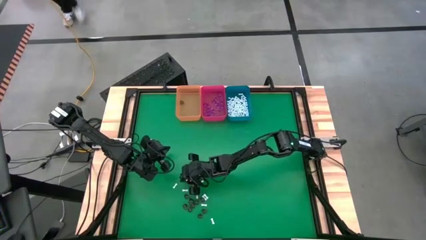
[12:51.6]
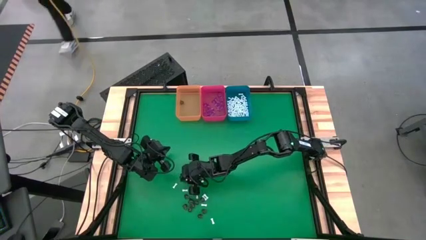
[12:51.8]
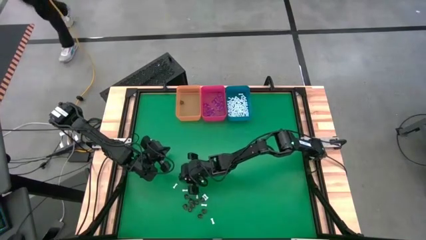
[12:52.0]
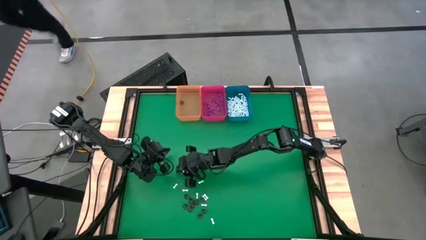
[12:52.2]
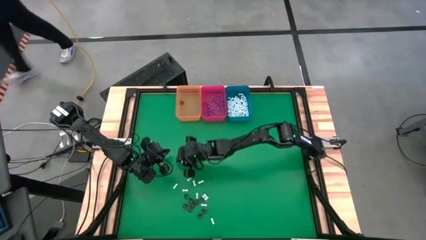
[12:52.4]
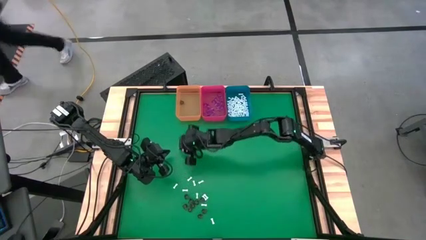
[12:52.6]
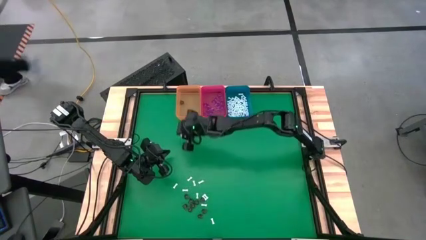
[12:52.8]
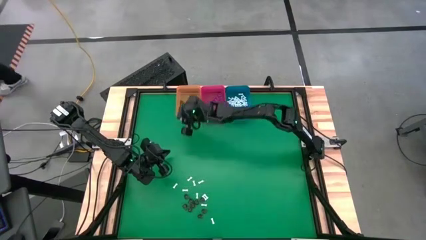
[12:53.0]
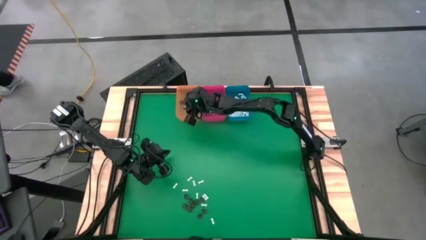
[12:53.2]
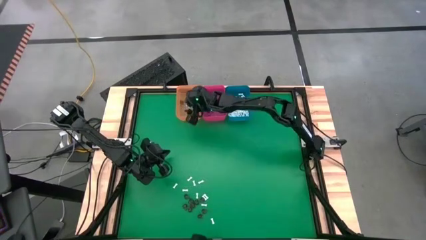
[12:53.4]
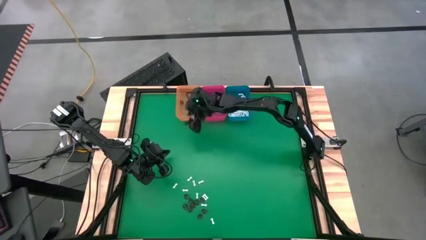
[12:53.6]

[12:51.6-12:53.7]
Task: Sort Halloween decoration
Put the transparent black skull toy into the orange bin

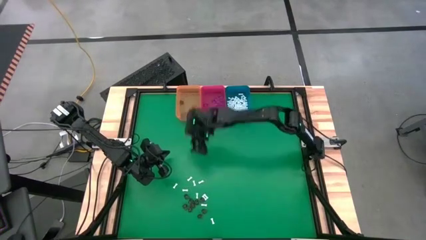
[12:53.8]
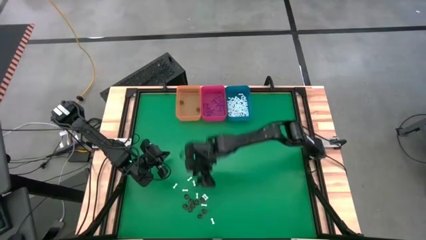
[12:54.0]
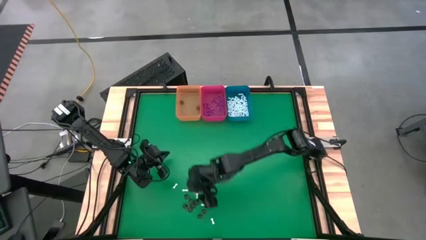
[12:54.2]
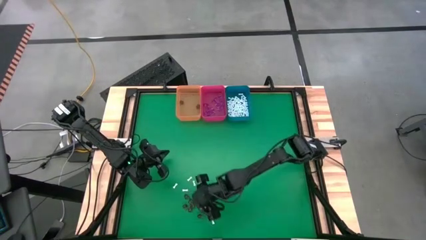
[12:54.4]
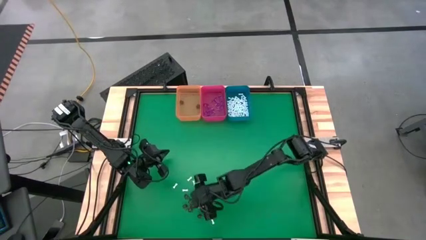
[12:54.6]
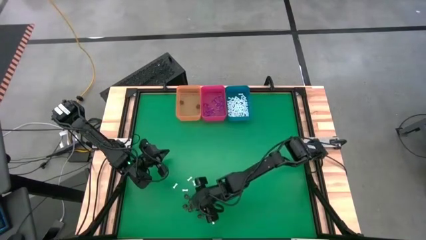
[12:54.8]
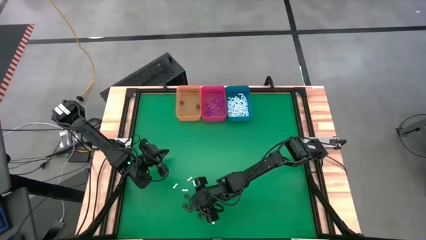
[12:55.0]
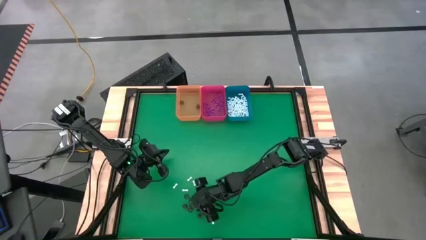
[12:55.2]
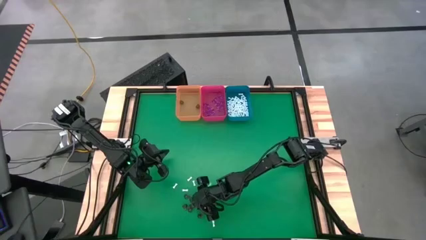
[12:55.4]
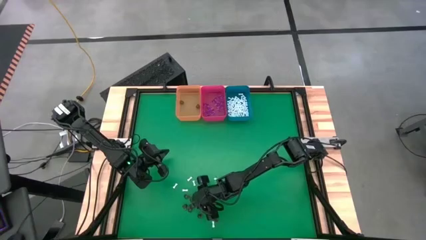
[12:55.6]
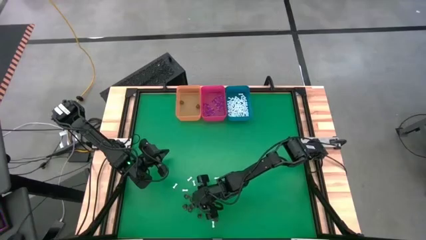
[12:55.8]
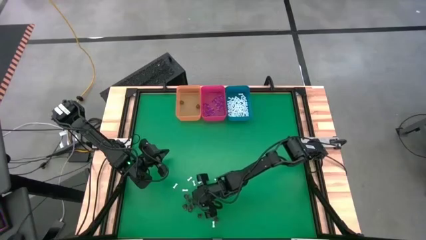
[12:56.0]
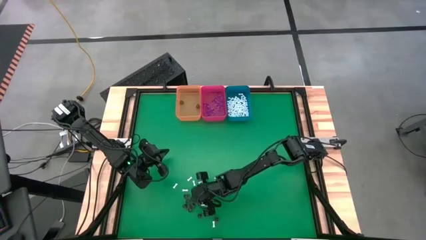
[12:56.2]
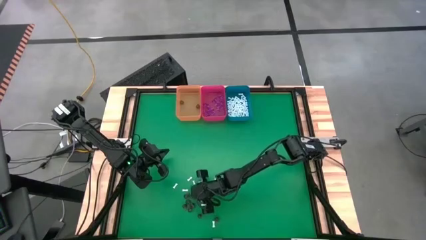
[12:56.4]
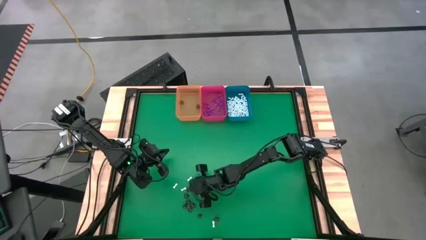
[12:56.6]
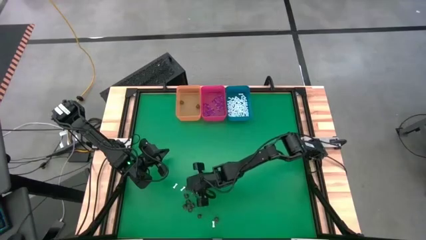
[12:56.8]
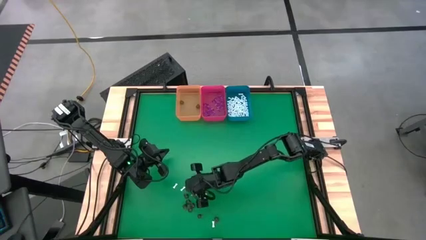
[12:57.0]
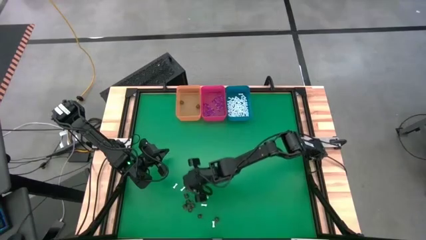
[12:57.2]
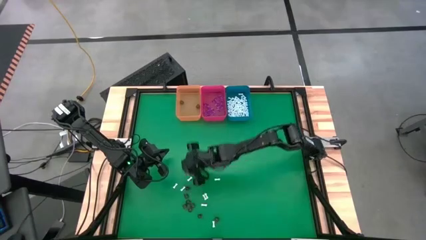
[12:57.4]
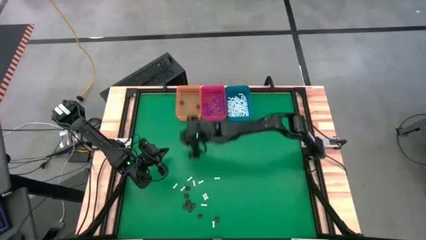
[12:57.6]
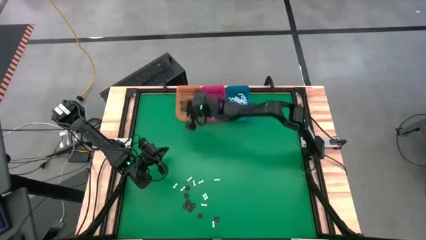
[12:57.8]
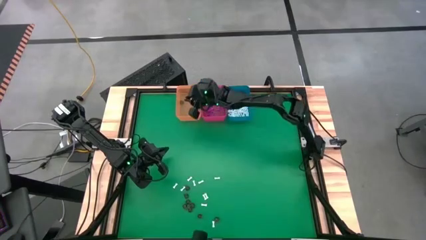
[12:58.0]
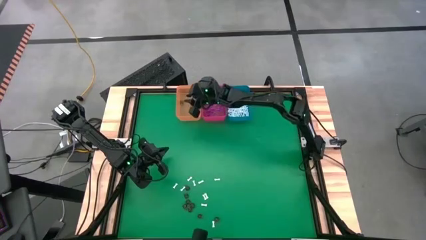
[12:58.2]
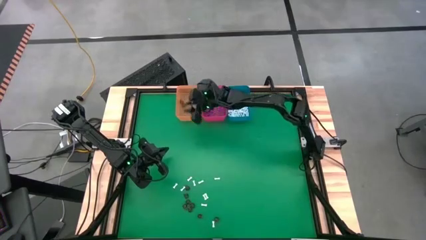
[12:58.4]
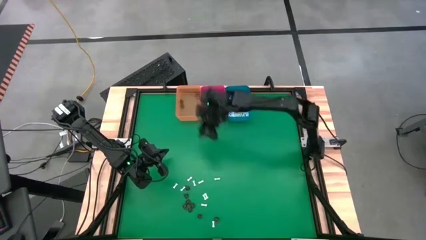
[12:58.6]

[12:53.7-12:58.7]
Put the transparent black skull toy into the orange bin

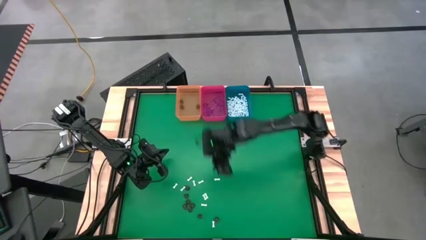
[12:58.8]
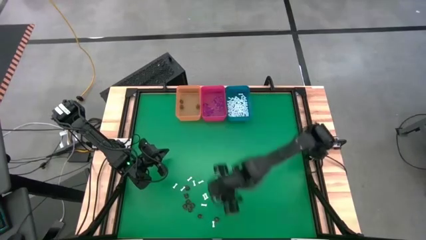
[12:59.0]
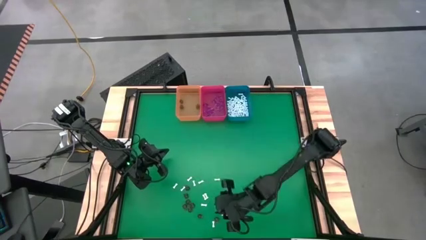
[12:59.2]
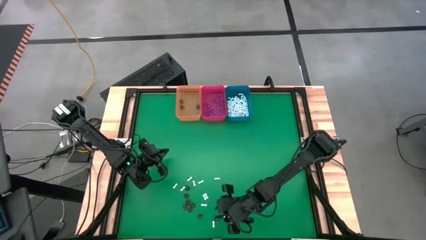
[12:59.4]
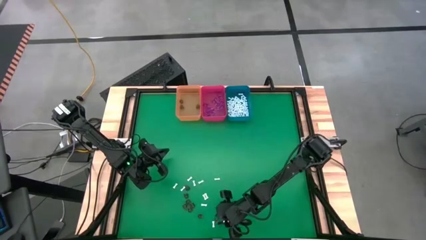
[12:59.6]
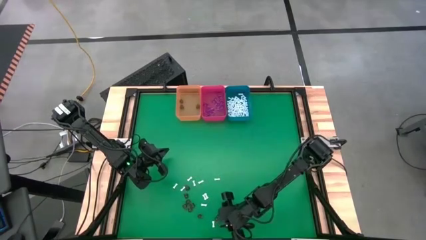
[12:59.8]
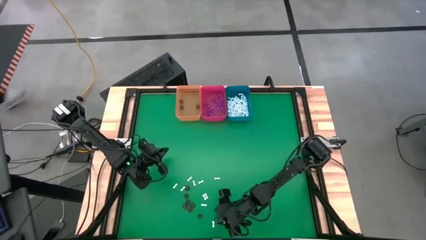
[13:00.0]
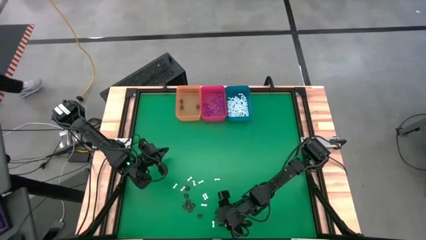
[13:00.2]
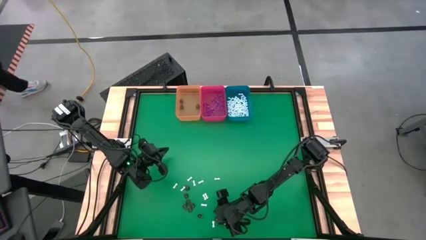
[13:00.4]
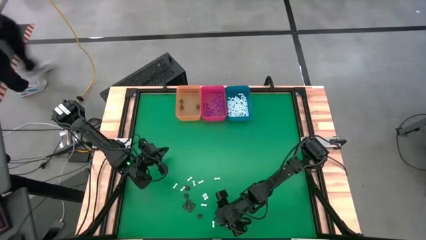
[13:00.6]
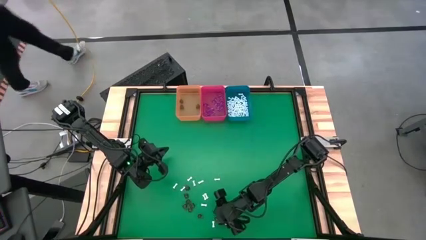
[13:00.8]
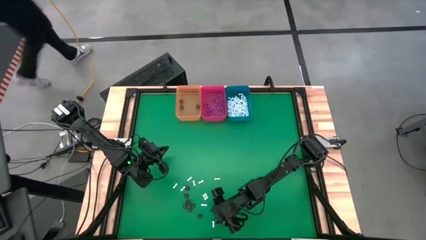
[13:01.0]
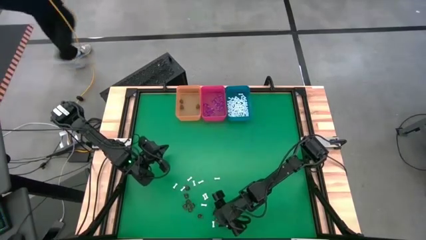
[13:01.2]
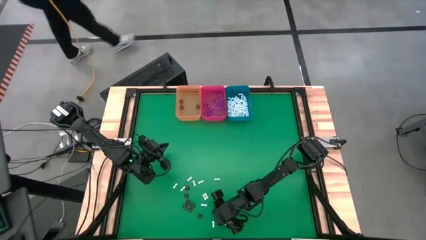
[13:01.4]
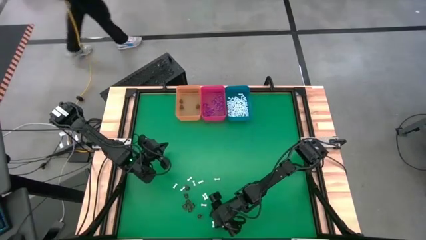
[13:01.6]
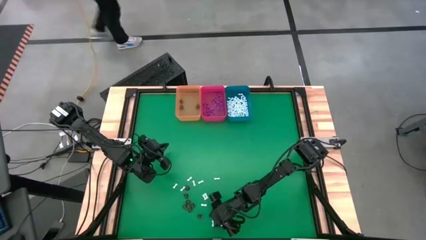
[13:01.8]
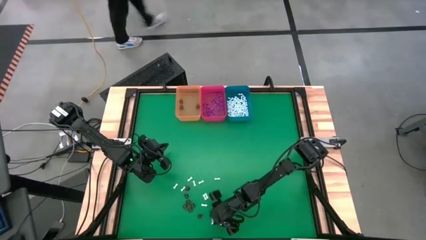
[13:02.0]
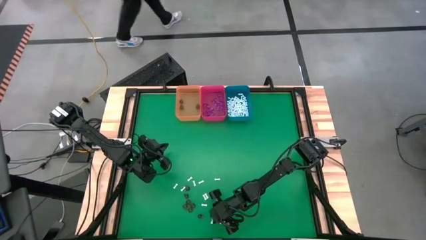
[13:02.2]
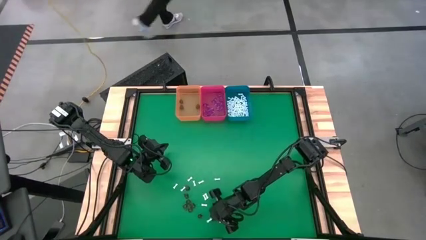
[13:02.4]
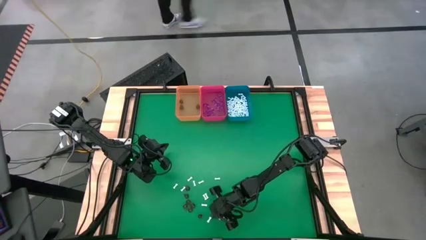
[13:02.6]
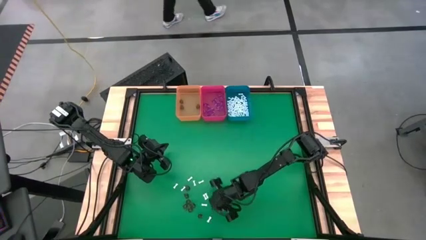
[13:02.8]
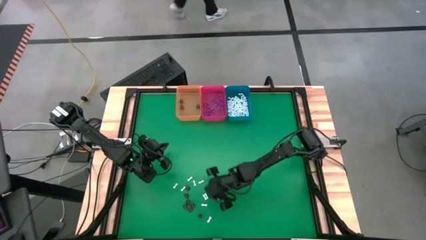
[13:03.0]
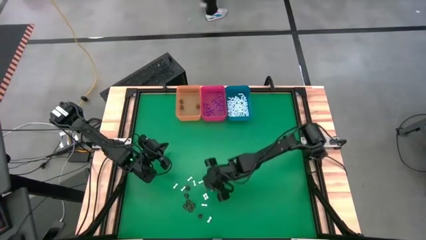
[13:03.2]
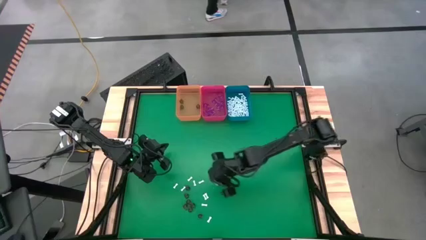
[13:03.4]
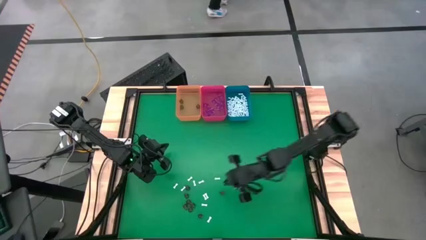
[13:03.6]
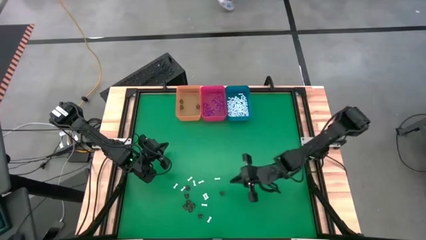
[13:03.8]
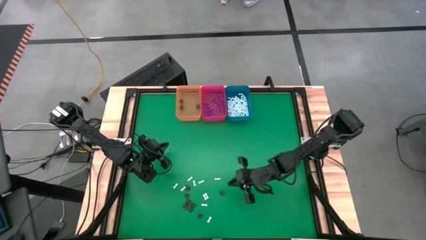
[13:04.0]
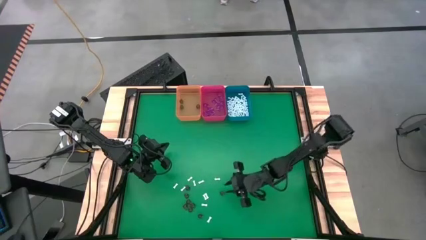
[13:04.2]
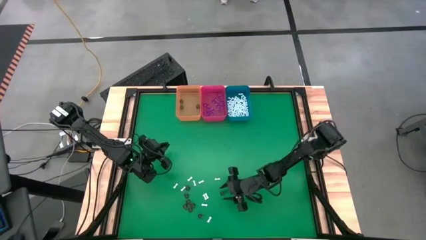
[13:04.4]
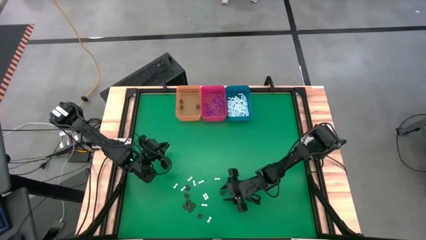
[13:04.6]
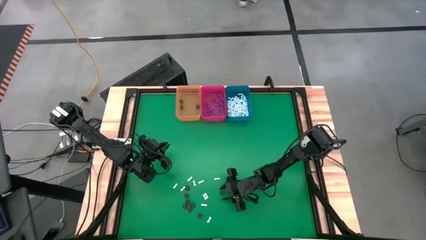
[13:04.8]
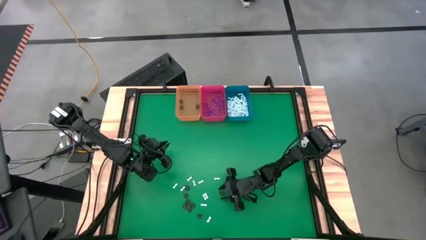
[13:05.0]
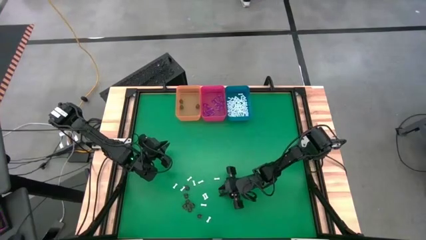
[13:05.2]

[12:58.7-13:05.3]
Put the transparent black skull toy into the orange bin

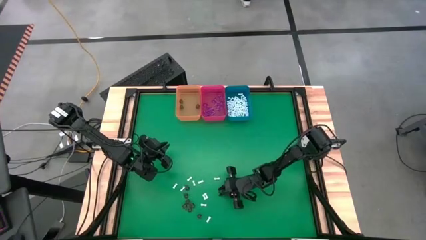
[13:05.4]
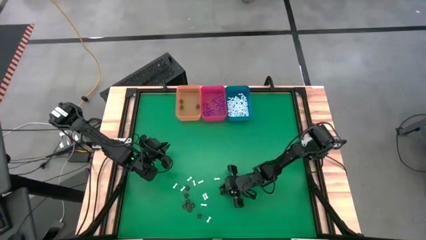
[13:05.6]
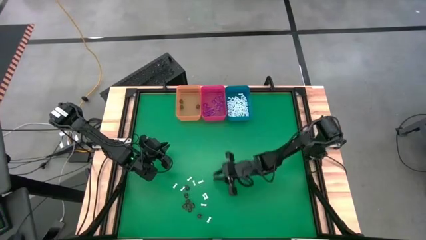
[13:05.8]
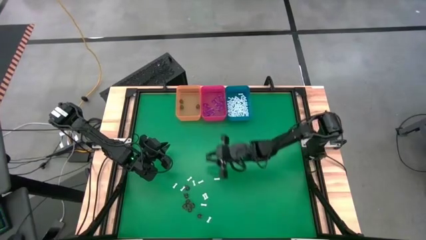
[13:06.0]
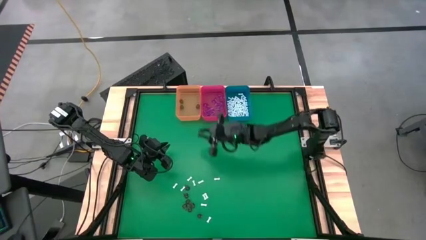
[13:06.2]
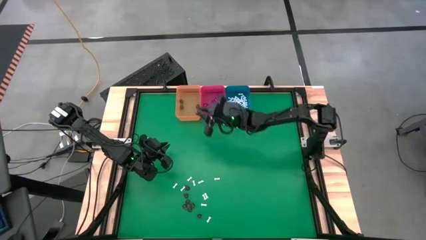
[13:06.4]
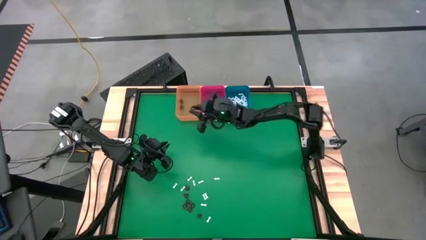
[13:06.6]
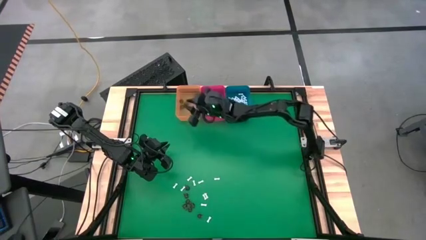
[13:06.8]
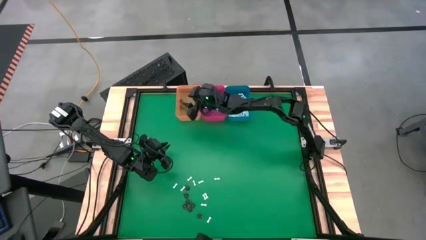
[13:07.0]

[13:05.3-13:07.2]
Put the transparent black skull toy into the orange bin

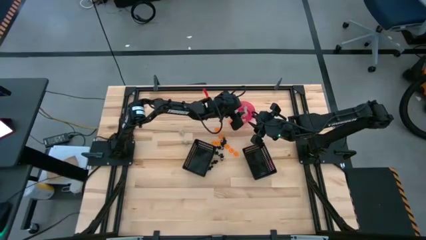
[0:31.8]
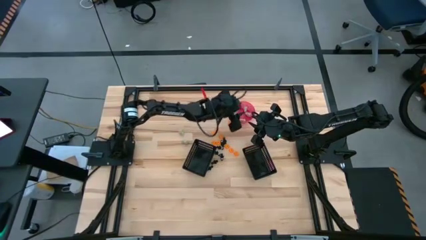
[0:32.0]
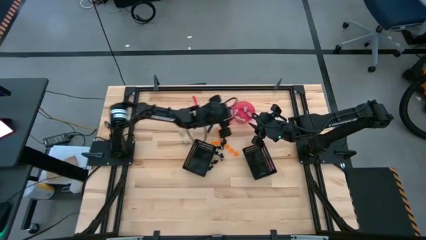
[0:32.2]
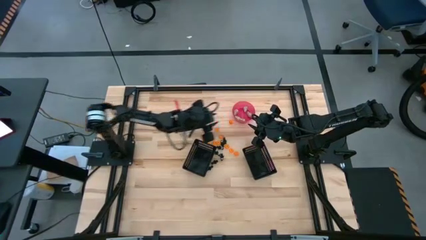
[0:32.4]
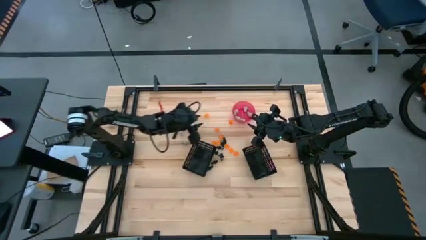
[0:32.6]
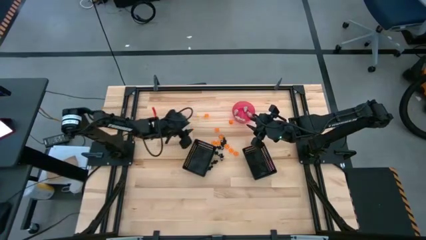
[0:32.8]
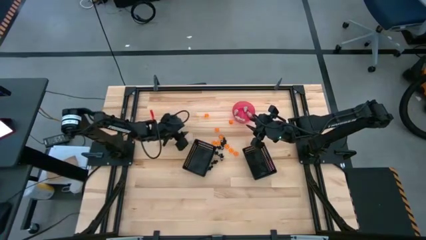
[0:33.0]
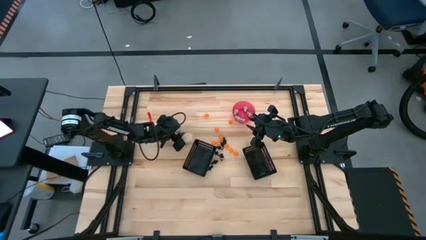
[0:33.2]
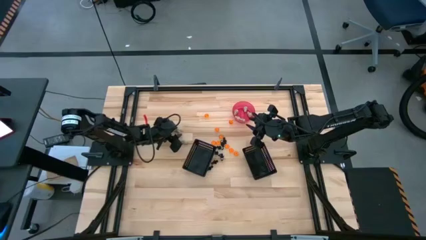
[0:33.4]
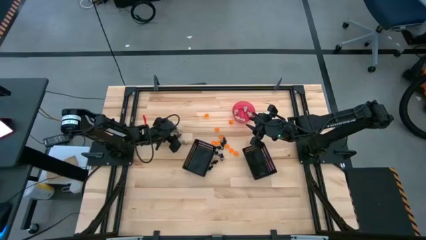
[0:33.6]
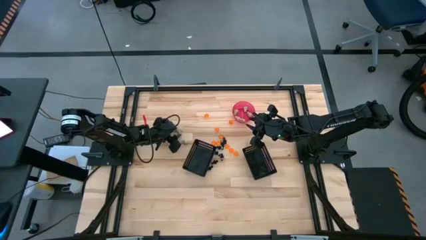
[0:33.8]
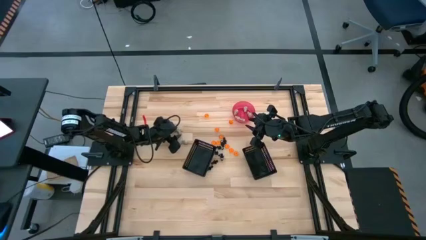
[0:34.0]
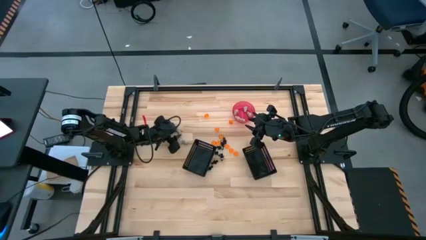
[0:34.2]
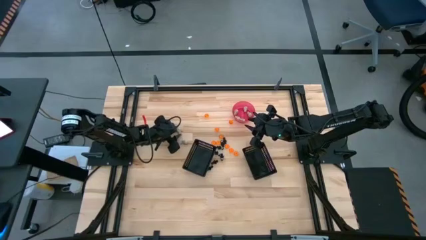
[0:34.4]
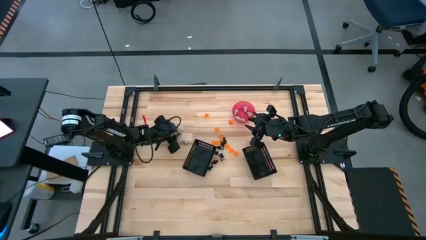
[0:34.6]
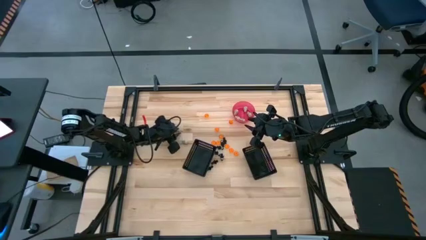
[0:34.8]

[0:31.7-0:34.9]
Task: Sort Halloween decoration
Put the white skull toy into the pink container
